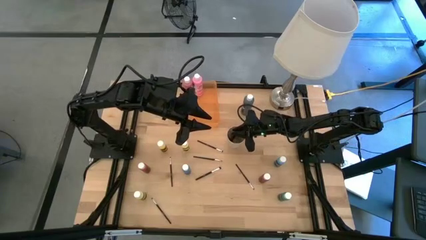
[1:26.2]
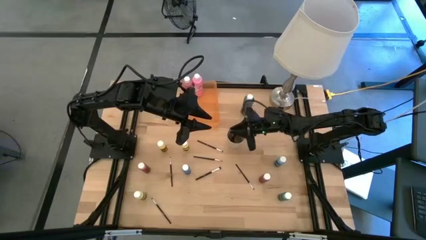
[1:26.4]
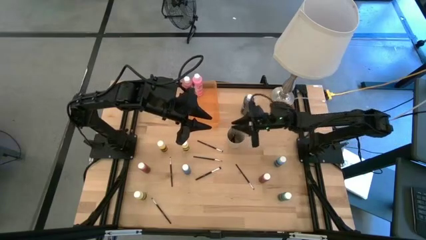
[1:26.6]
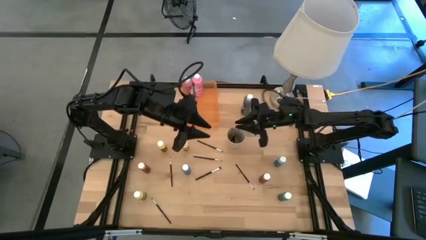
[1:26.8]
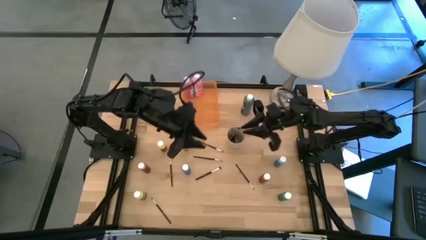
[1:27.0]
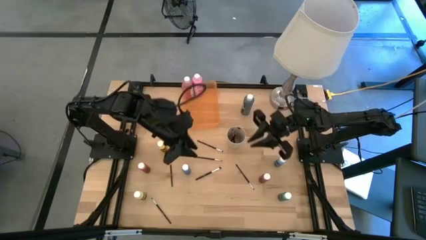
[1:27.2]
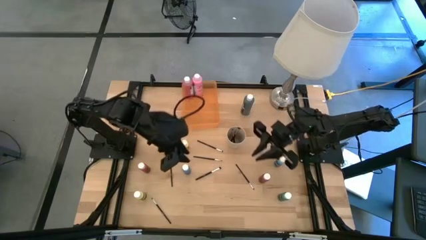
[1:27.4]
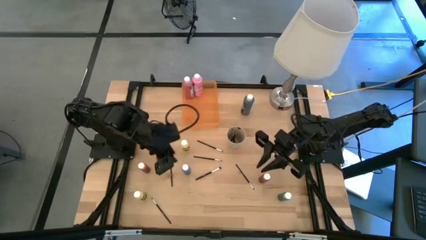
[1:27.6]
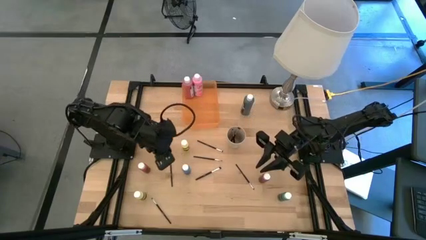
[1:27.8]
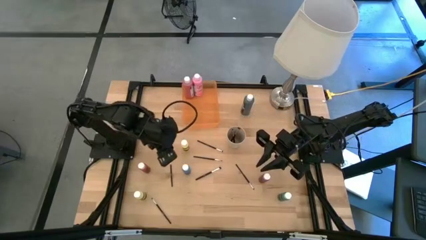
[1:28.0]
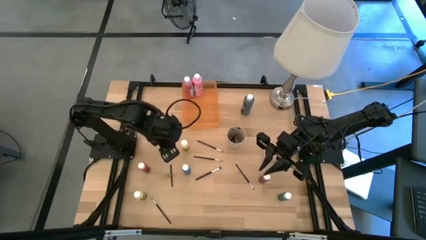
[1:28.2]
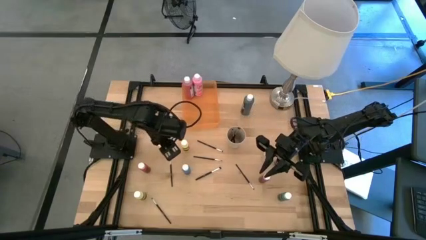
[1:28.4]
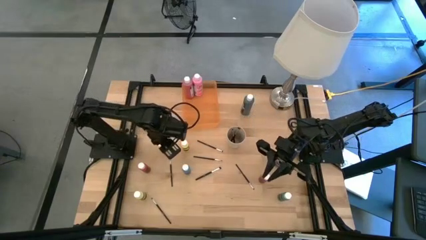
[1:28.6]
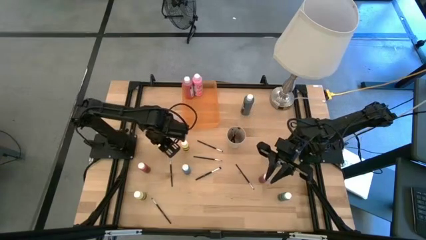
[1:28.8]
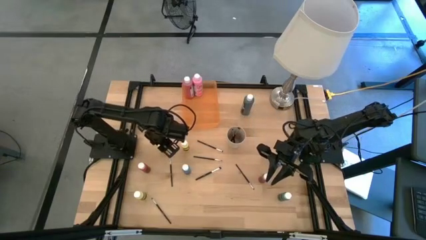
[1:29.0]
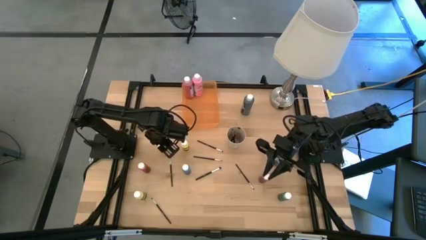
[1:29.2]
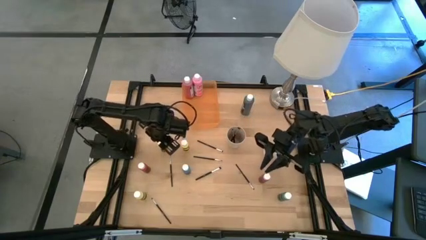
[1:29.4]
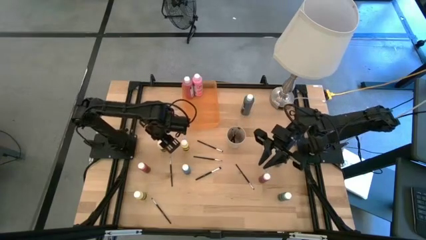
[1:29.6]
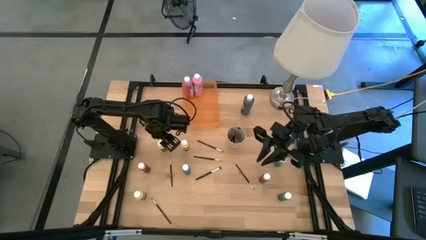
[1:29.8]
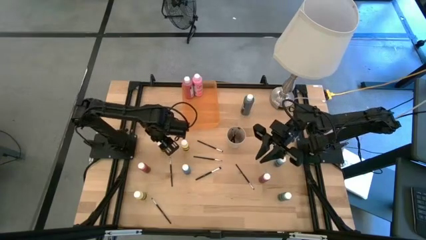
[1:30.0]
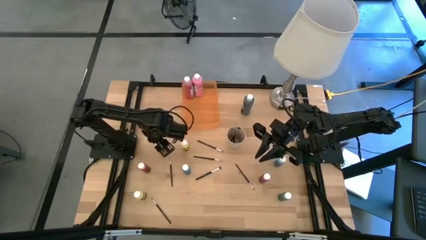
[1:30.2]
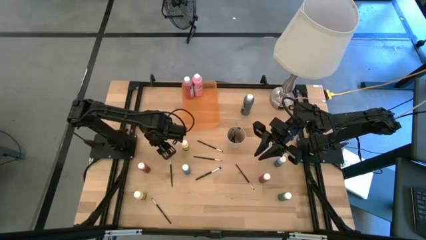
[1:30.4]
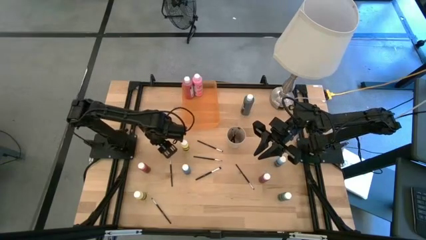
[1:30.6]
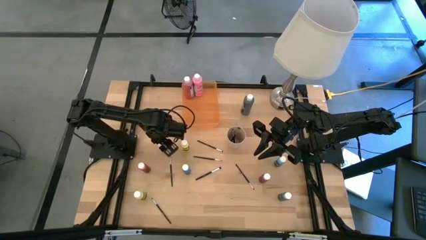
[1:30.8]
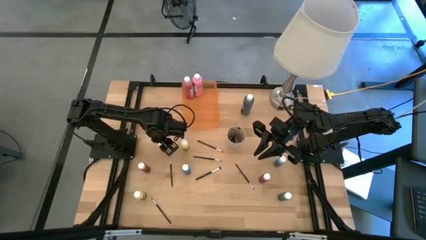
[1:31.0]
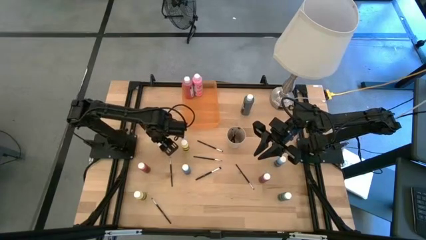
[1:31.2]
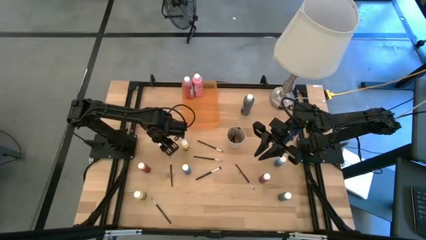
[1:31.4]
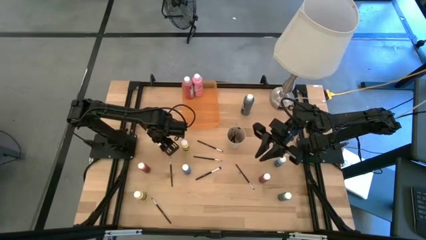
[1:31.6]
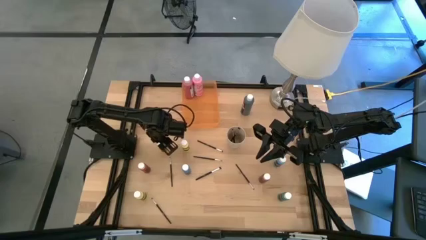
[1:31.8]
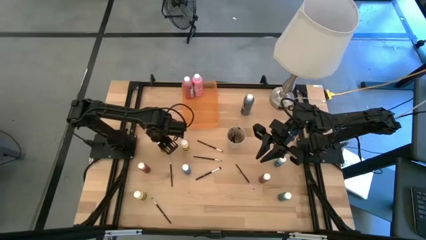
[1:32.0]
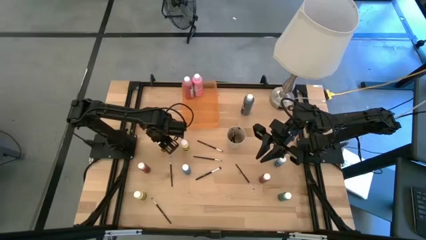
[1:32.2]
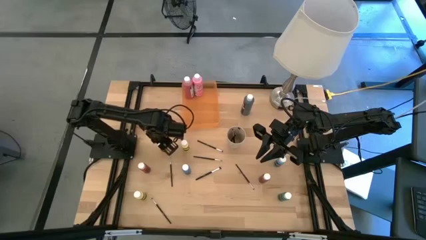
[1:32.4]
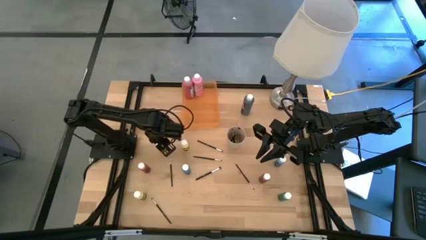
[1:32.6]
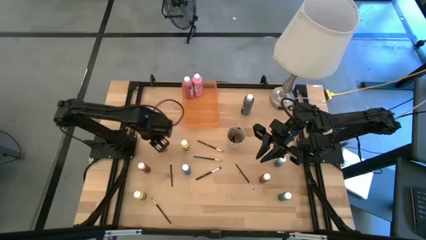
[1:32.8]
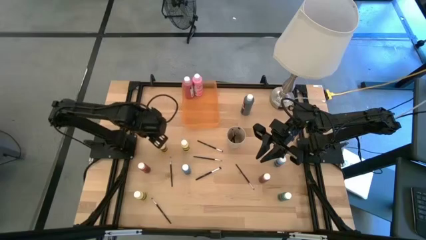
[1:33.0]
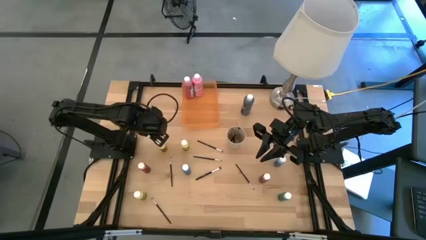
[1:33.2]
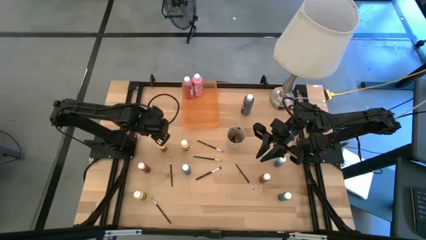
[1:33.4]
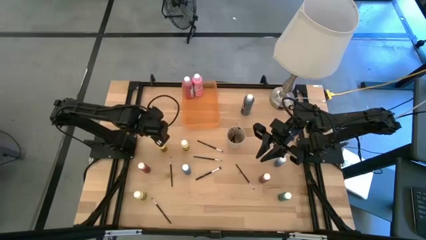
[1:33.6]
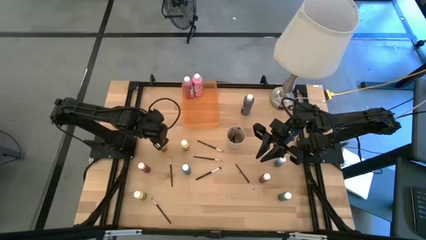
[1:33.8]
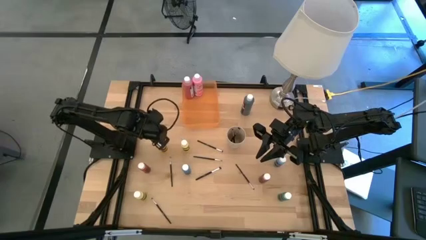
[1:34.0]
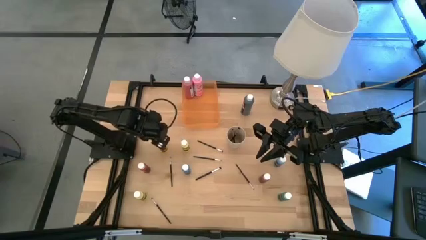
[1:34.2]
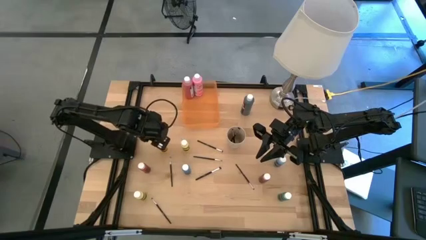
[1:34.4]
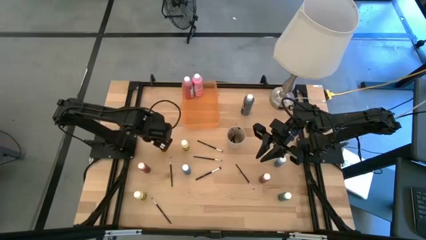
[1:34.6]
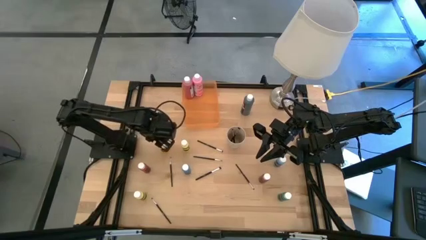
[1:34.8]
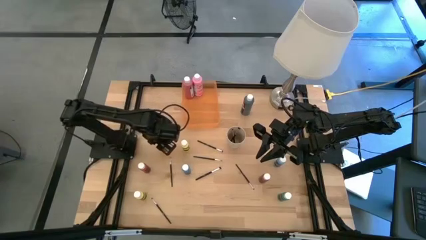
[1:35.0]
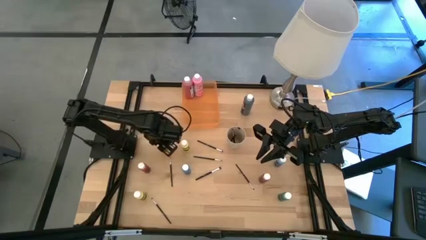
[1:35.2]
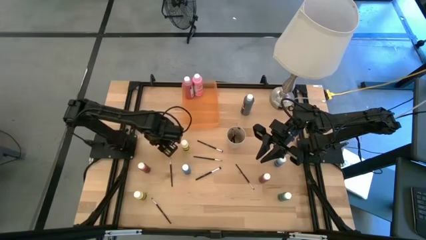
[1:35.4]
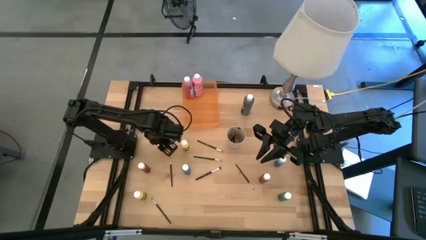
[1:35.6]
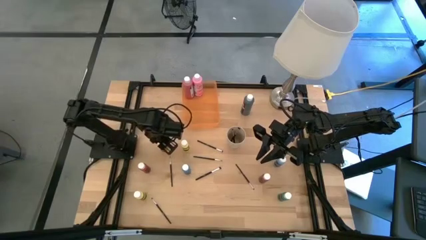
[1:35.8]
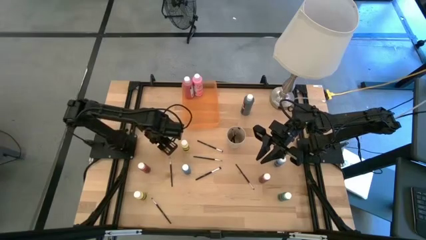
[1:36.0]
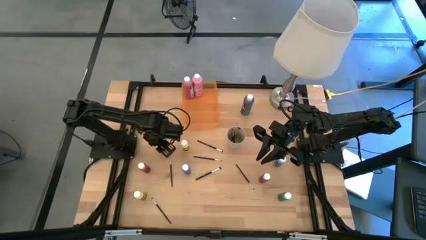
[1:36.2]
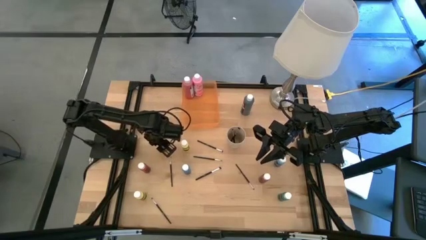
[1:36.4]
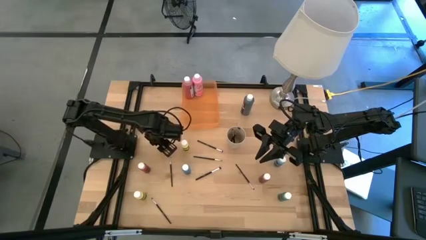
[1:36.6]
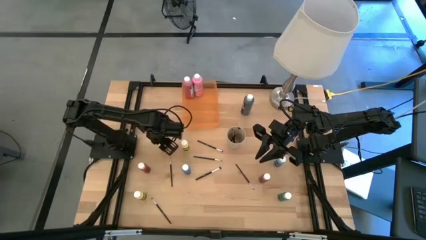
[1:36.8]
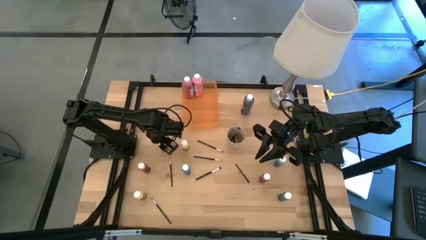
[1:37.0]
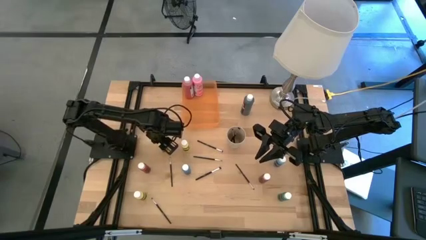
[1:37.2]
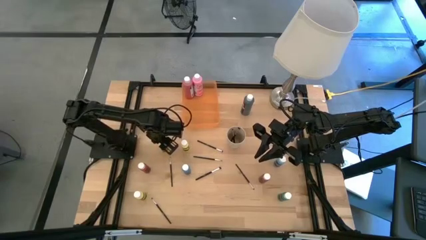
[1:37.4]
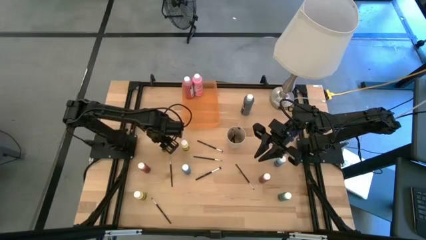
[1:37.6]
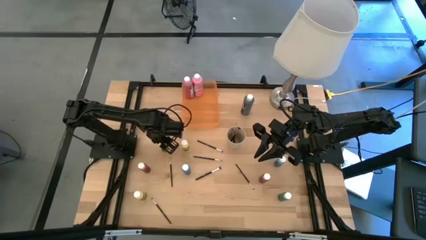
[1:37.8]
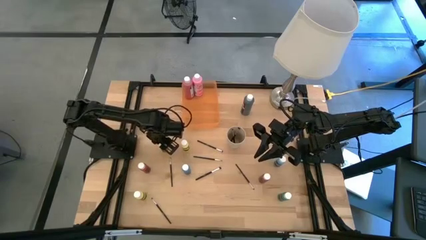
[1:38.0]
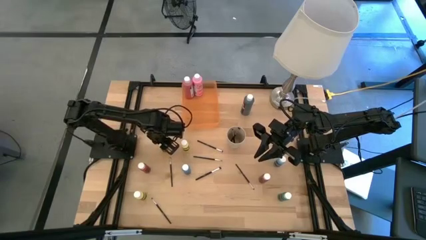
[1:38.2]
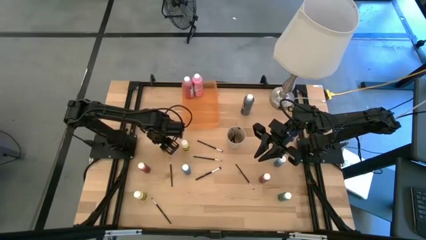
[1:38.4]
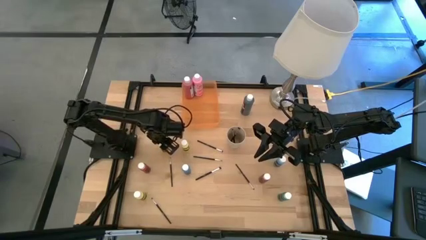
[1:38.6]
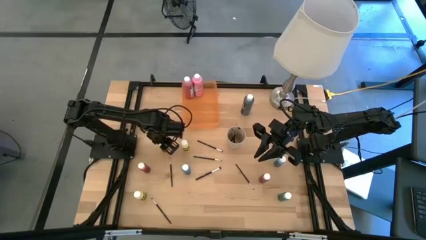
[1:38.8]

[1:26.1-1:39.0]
Task: Pick & Place Paint Supplies
Put the small yellow paint bottle into the orange bin

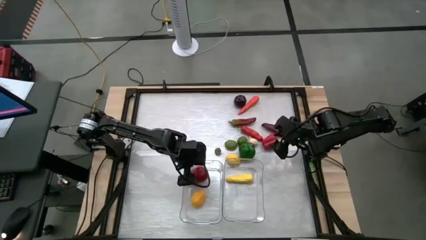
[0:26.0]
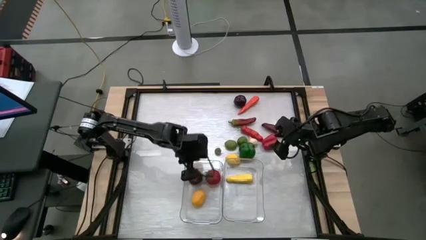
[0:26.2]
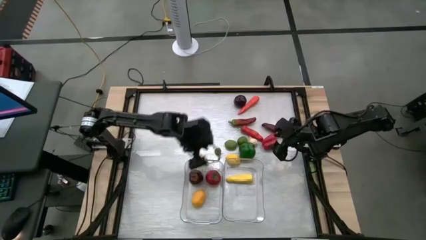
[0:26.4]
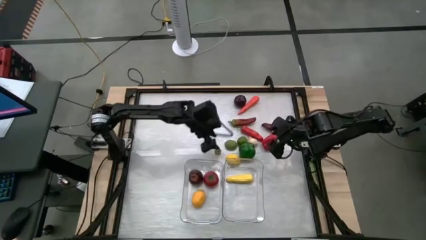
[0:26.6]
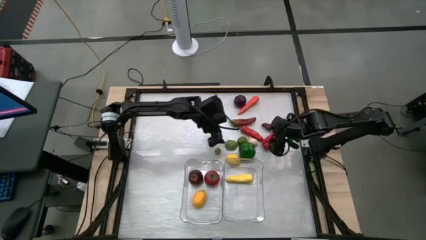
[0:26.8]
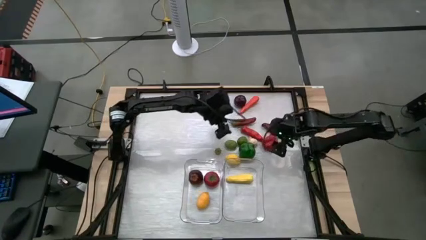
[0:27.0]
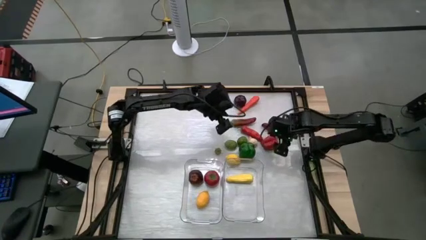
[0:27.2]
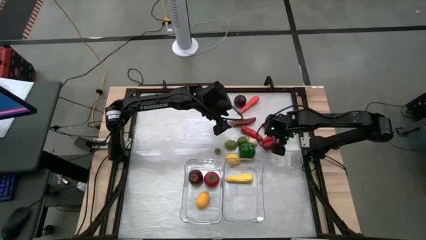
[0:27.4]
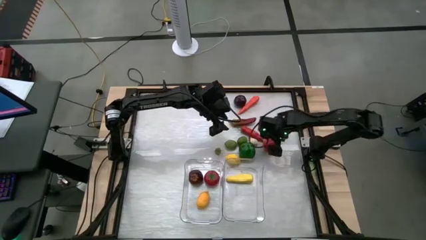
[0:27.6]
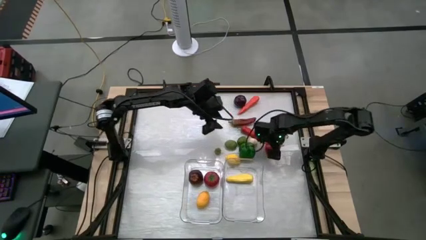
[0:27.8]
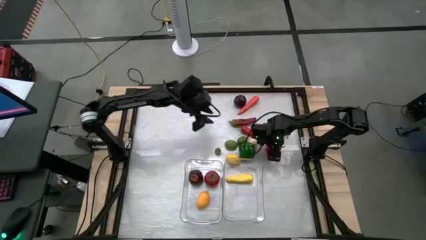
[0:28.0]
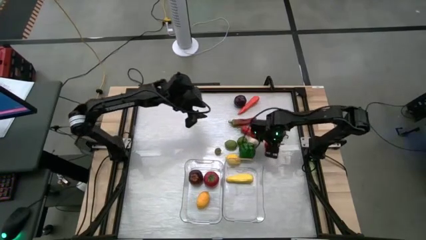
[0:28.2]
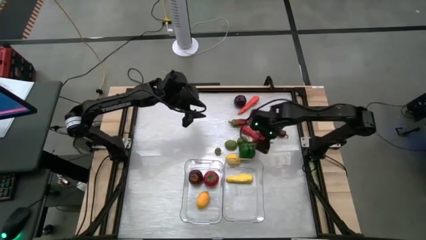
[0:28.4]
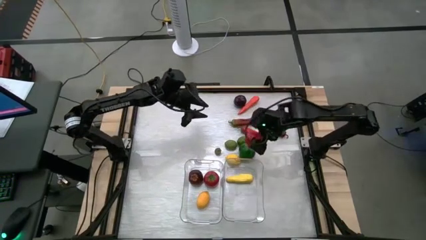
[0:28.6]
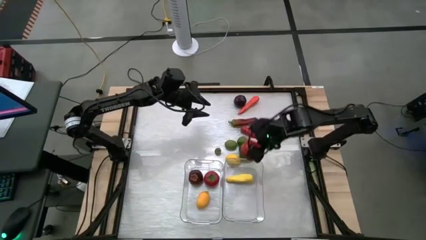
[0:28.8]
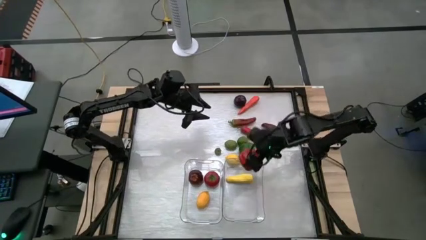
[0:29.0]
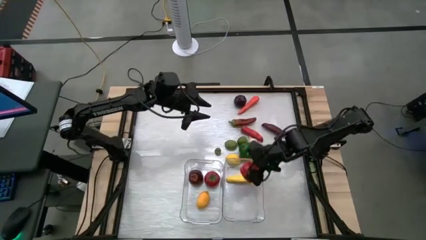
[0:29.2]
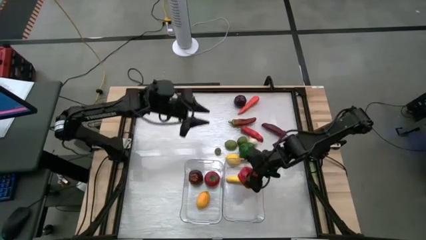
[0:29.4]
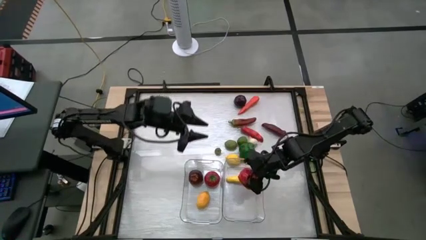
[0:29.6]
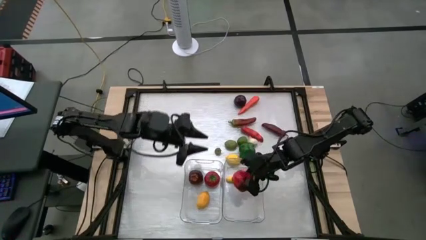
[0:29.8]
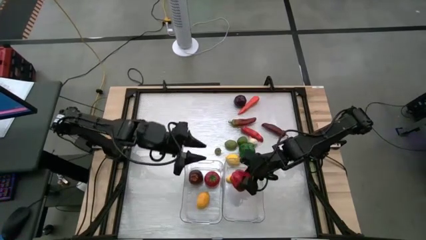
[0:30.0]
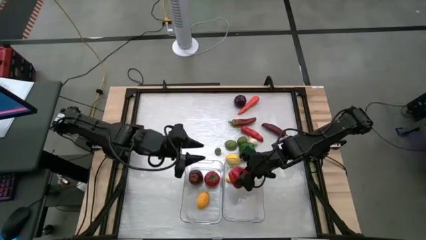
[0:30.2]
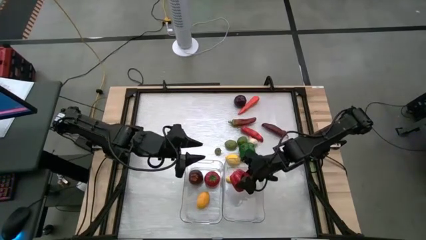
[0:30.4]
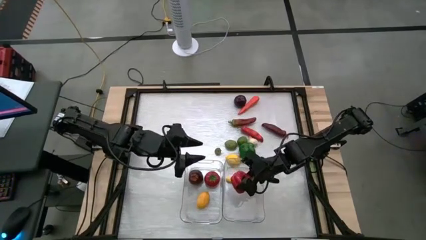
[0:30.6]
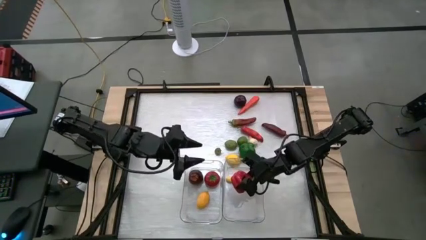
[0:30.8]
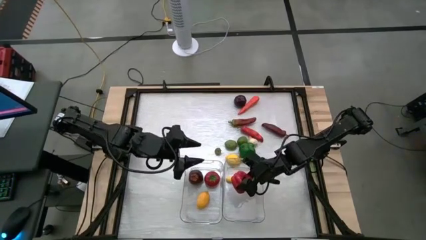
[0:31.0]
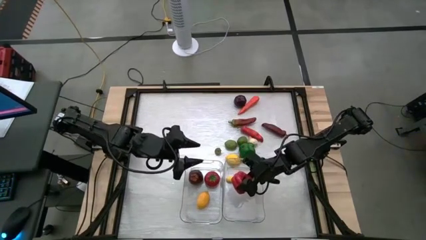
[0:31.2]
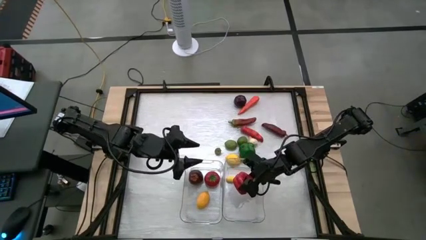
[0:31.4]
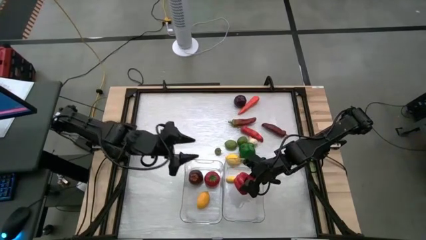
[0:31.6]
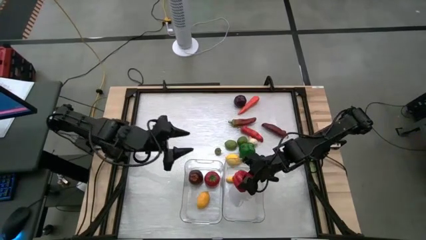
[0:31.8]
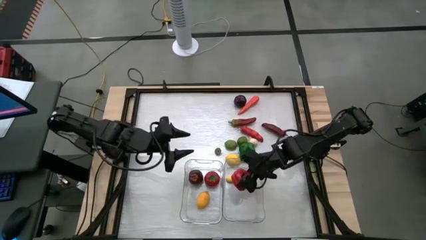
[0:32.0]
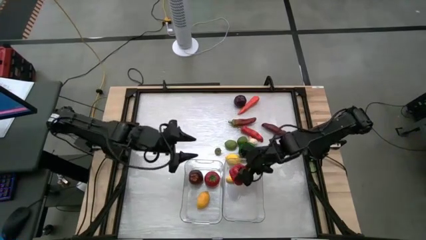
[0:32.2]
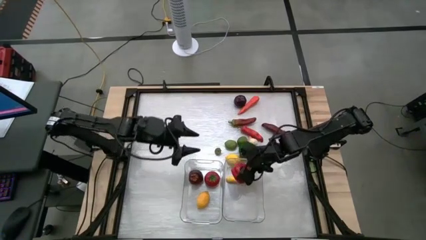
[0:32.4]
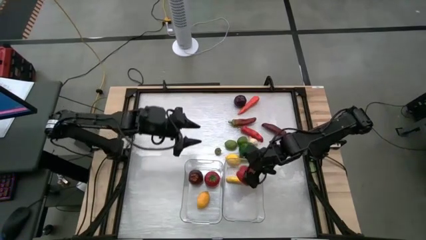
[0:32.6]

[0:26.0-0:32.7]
Task: Sort produce into baskets
Put the red bell pepper into the right transparent bin
